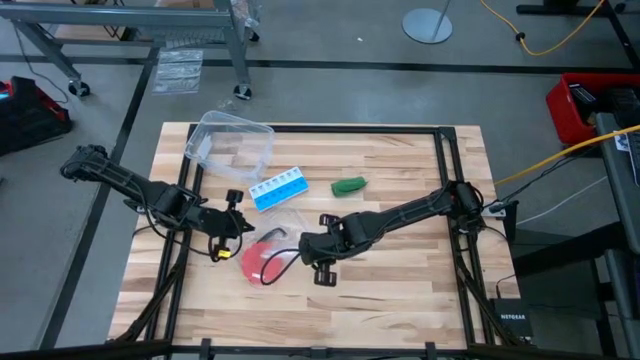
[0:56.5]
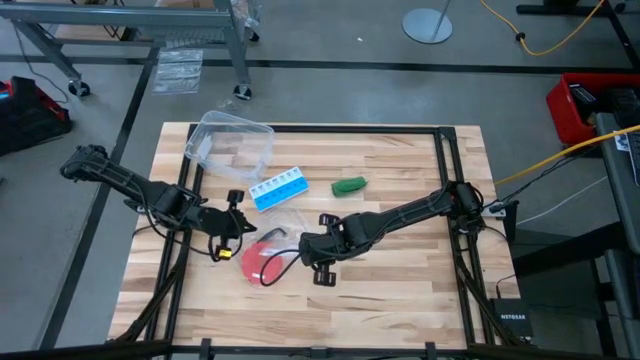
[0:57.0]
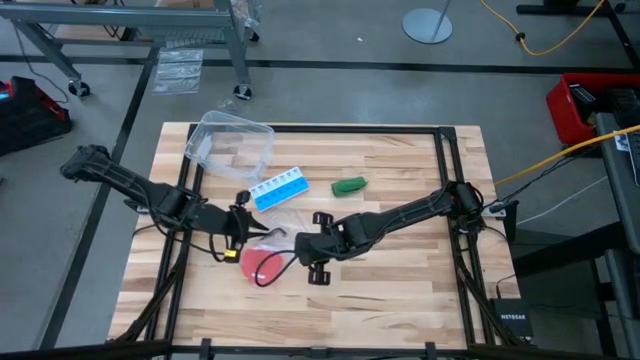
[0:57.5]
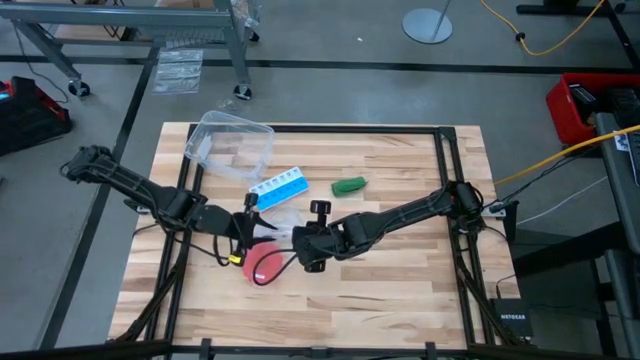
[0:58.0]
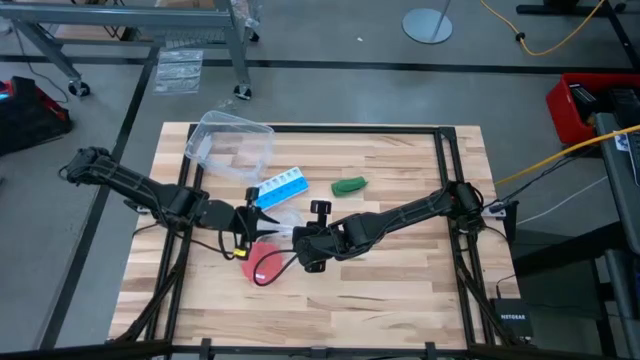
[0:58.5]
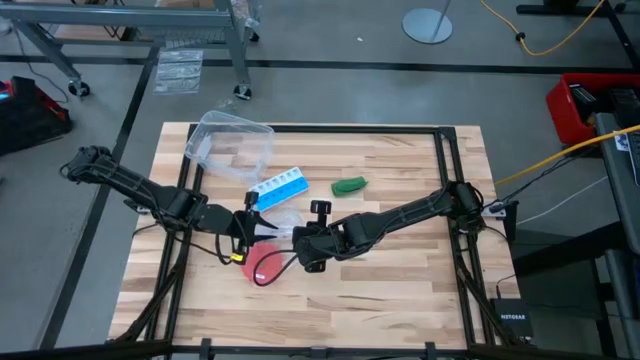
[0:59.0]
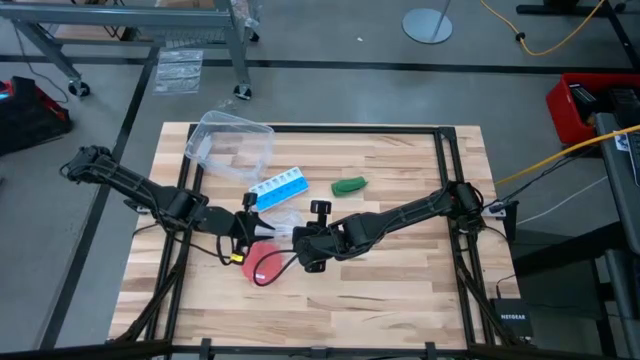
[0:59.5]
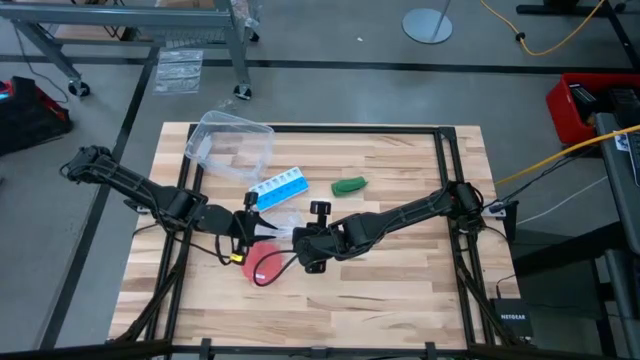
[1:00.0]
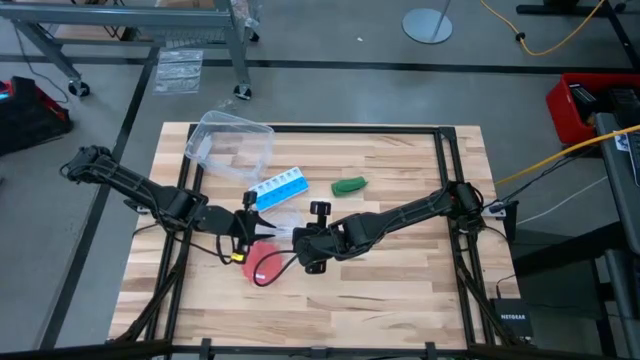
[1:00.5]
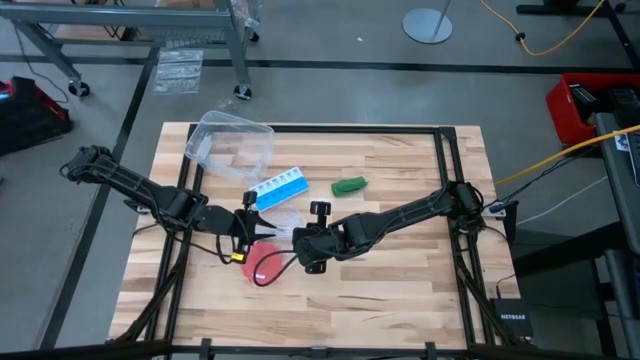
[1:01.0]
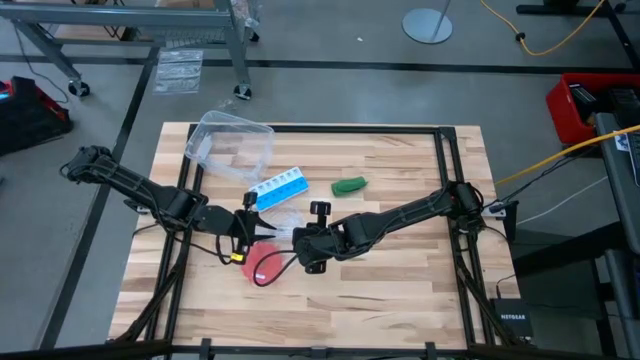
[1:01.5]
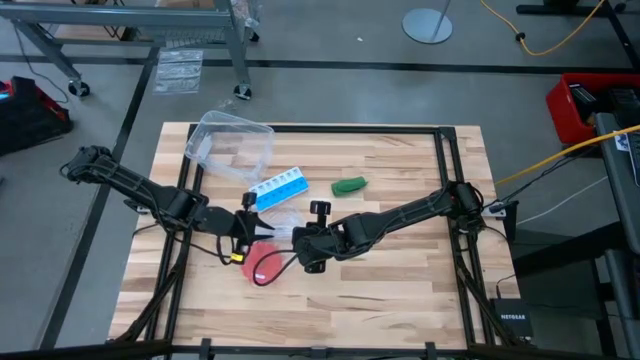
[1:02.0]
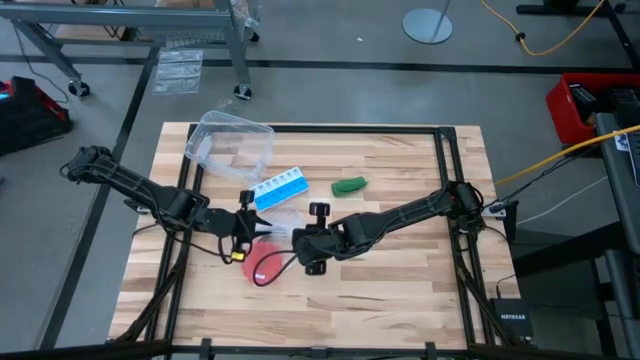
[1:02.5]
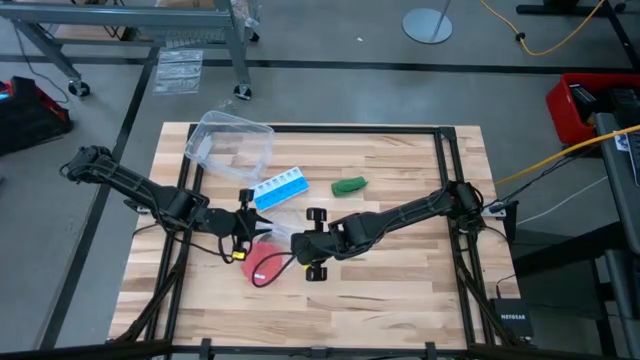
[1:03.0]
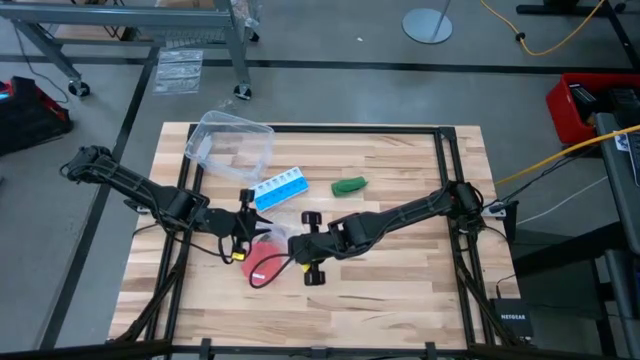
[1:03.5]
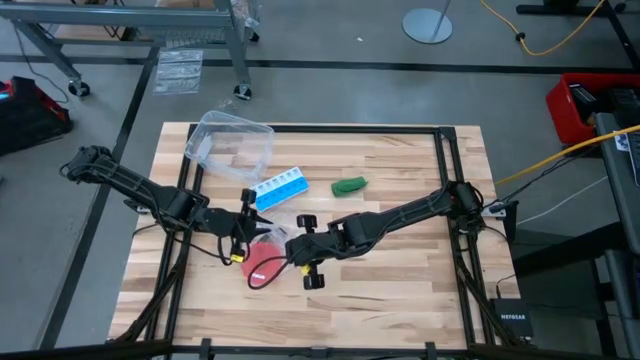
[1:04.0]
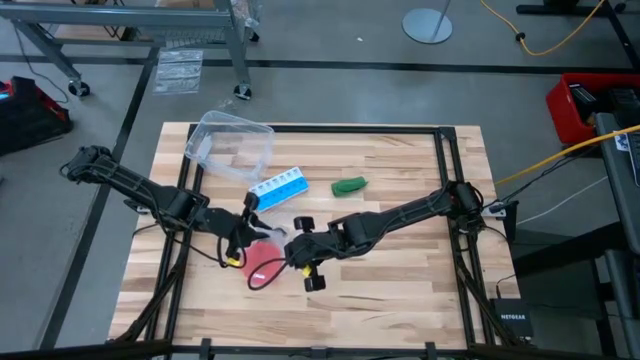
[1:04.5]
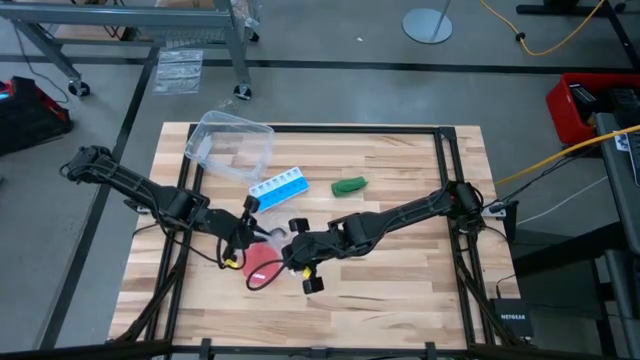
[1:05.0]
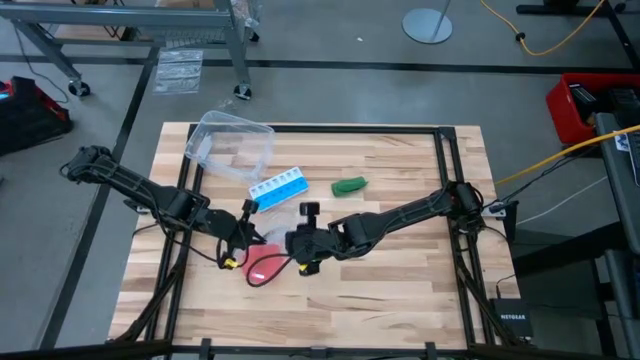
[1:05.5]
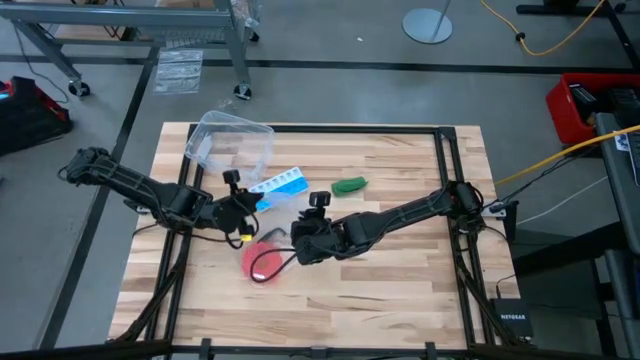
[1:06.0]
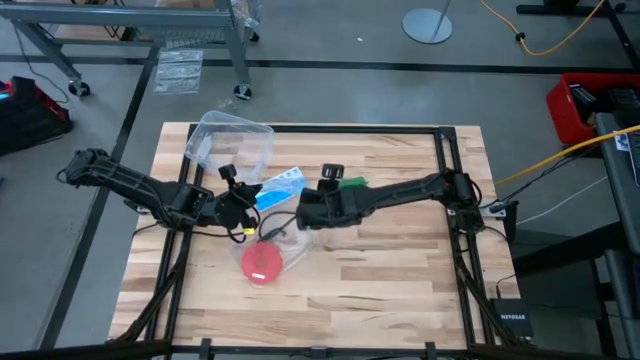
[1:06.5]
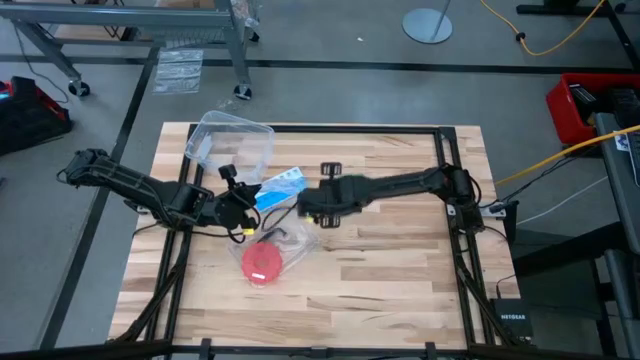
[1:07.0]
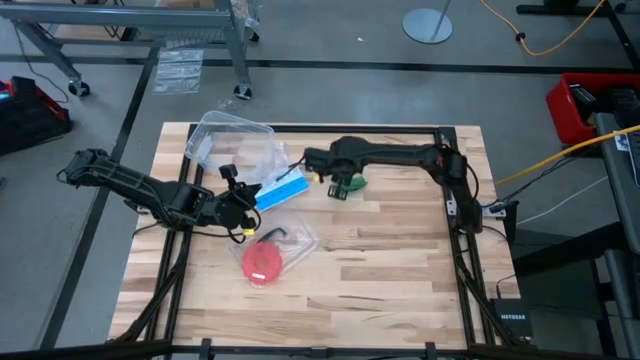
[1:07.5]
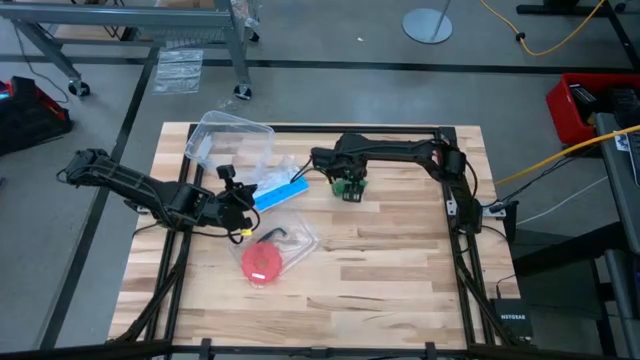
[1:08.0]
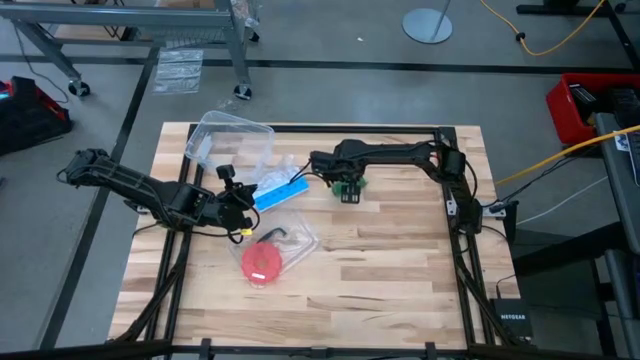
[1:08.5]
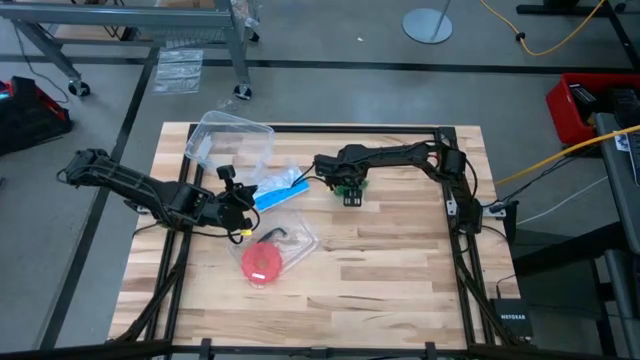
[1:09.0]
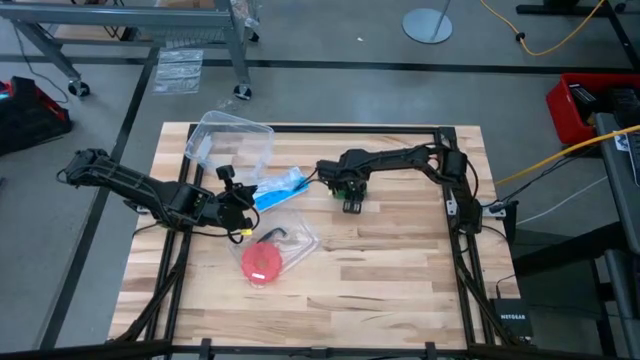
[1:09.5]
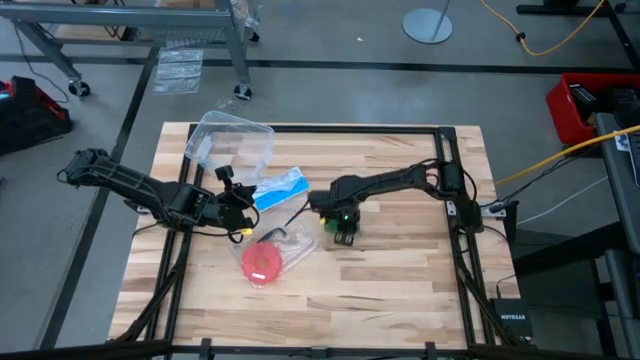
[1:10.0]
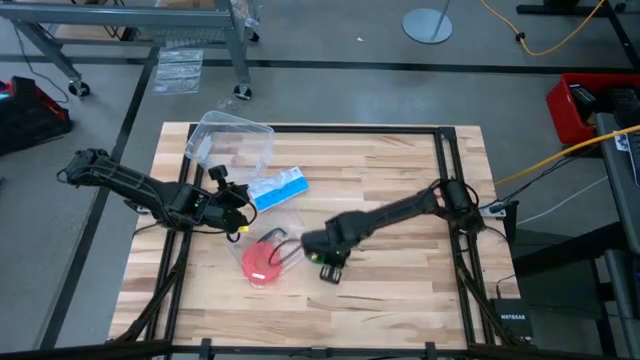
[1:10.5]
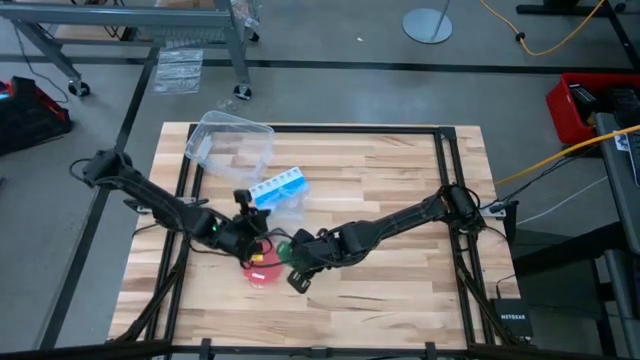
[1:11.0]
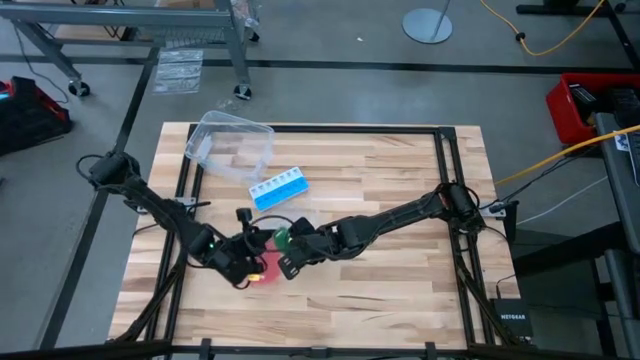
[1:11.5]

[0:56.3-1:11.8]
Task: Roll bandage
Put the green bandage into the transparent zip bag

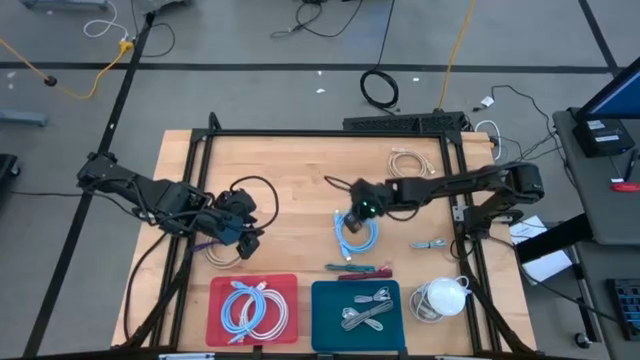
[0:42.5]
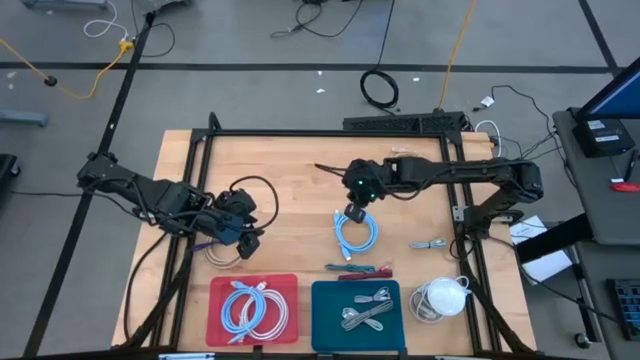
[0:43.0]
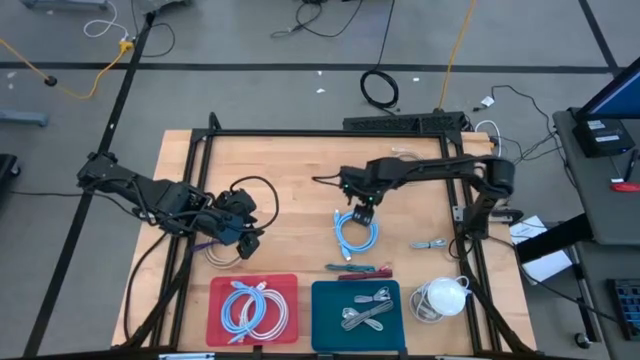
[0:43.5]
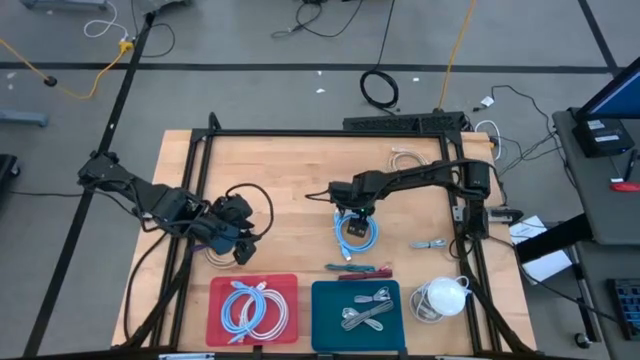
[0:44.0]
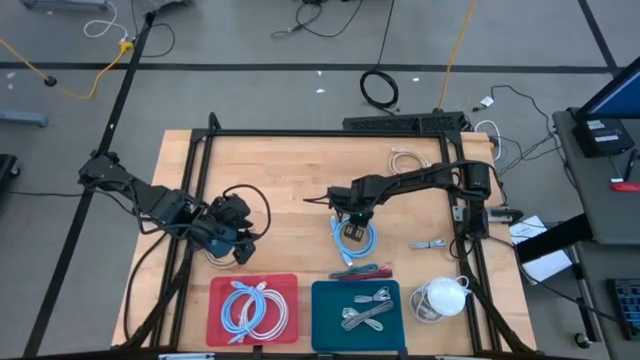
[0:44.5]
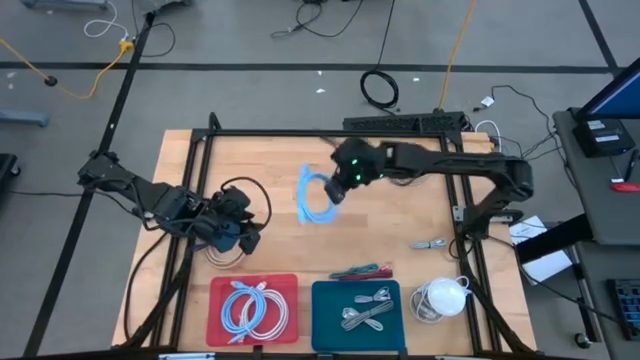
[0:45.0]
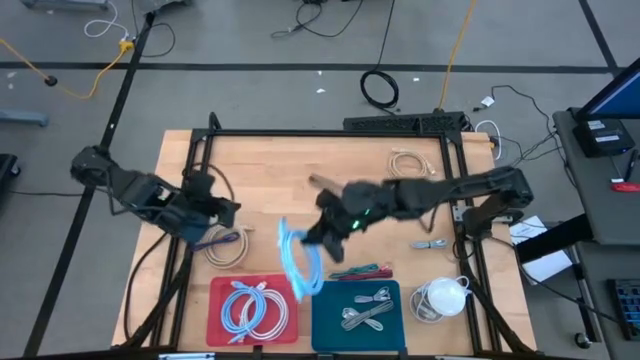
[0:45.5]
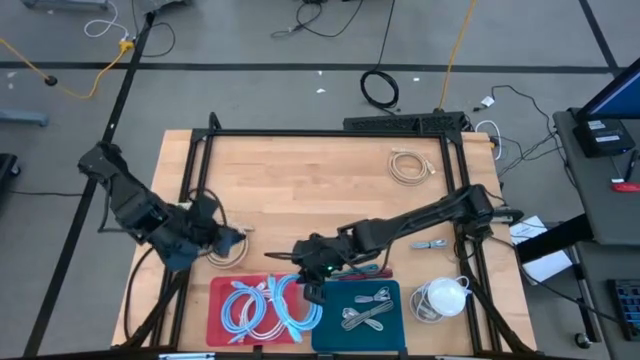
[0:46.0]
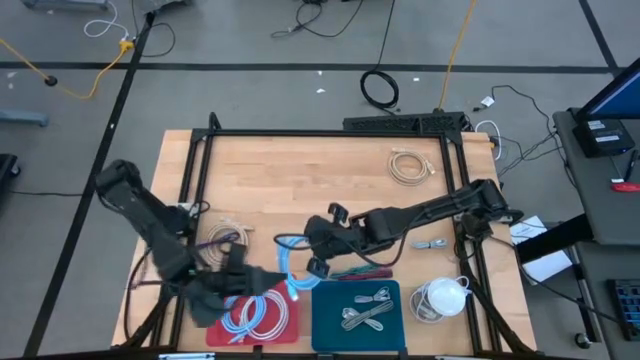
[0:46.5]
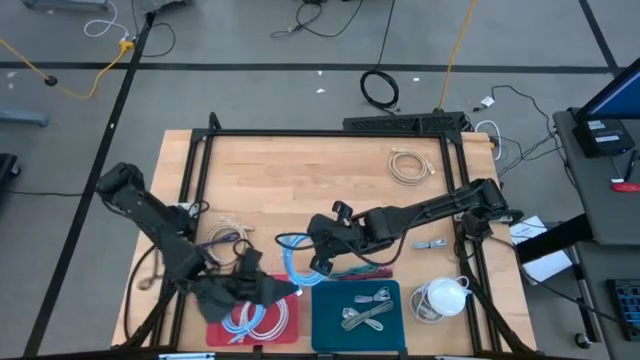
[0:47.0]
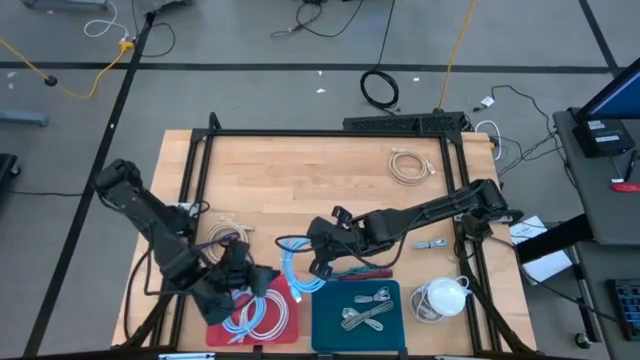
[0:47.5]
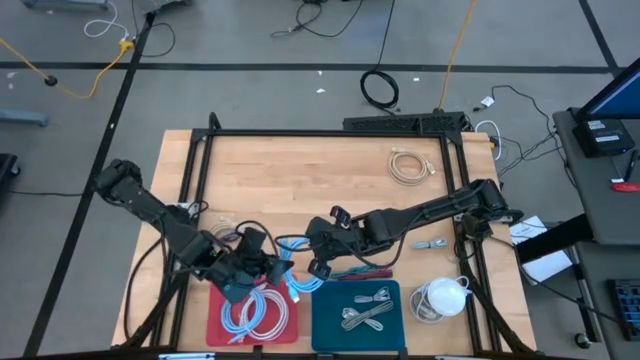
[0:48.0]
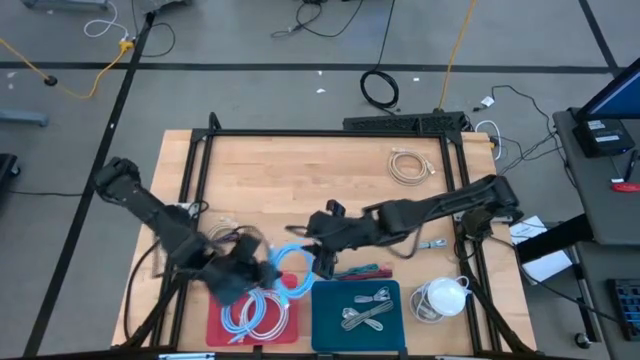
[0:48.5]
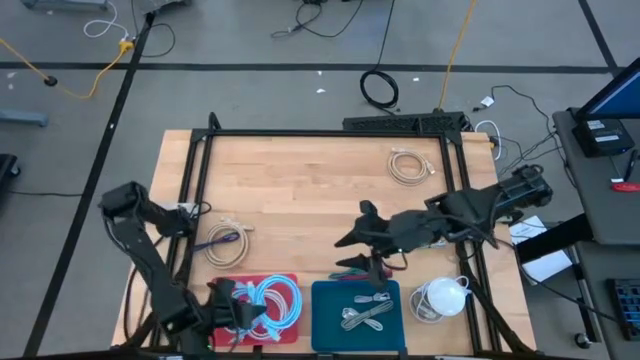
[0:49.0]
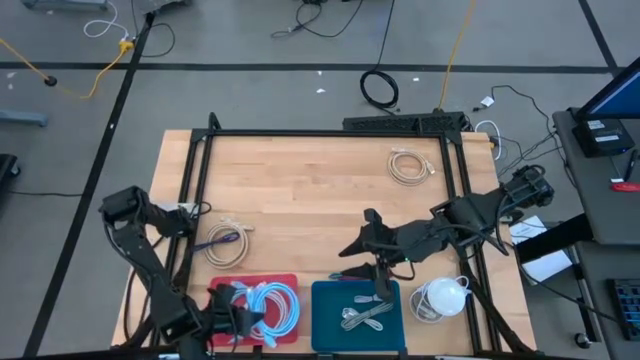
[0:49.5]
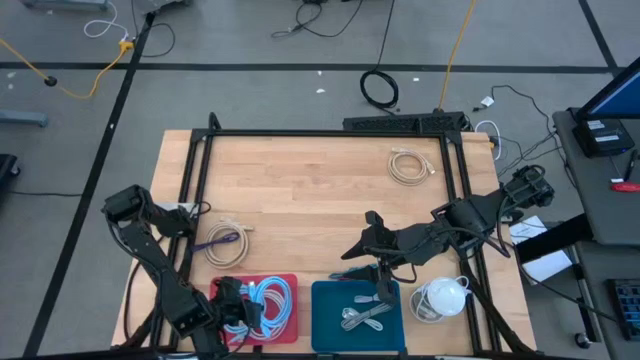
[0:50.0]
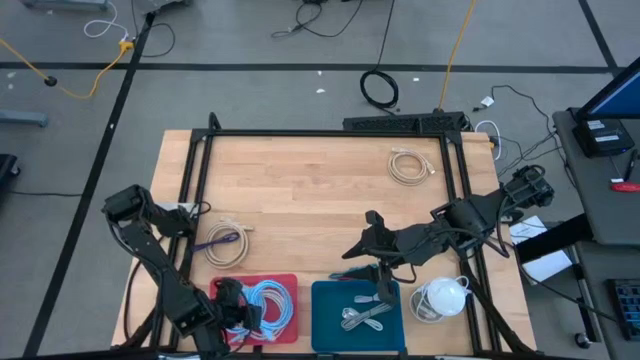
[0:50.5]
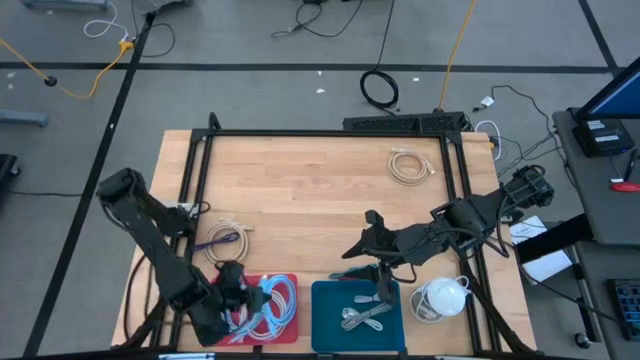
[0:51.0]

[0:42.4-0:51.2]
Task: Pick & Place USB Port
Put the sky blue HDMI cable into the red bin
